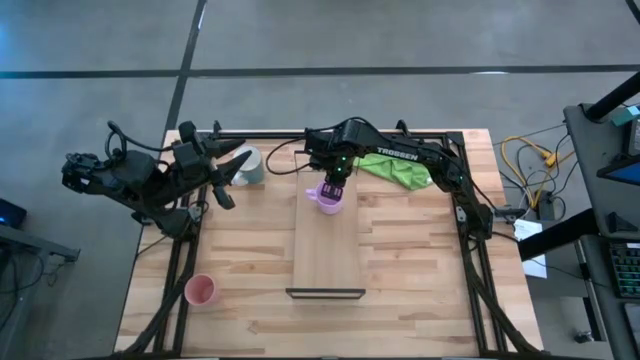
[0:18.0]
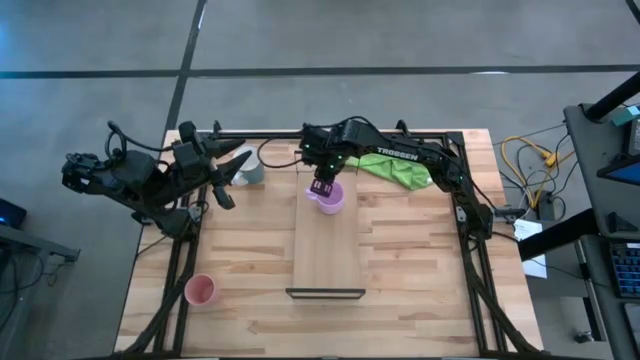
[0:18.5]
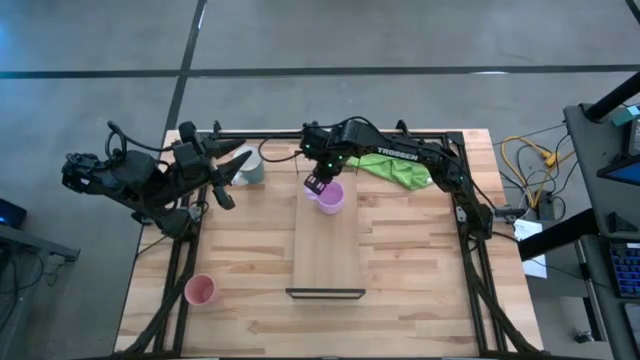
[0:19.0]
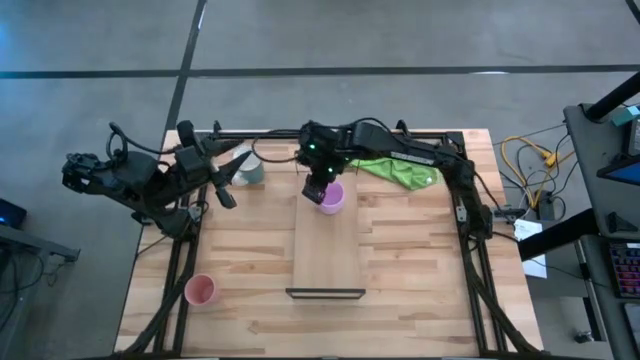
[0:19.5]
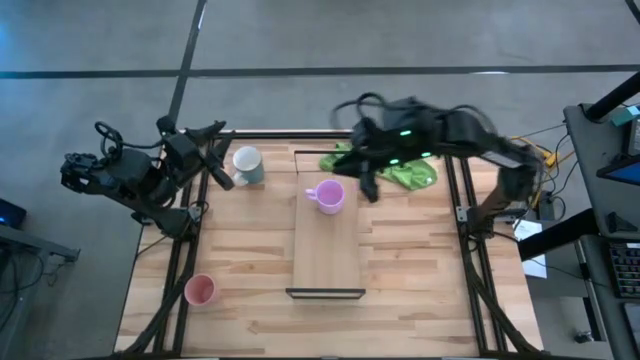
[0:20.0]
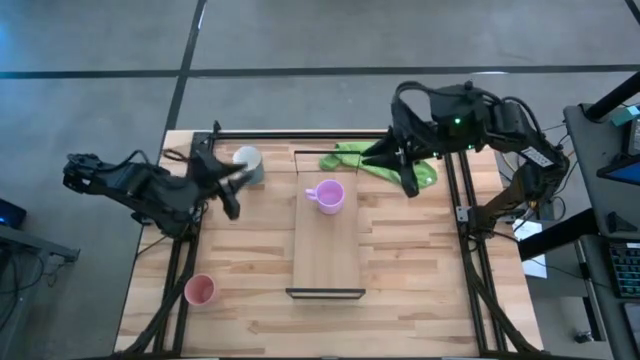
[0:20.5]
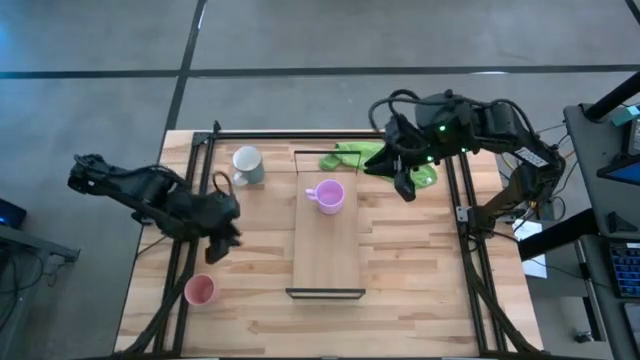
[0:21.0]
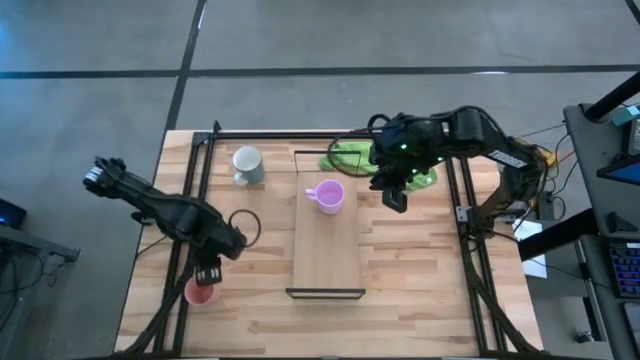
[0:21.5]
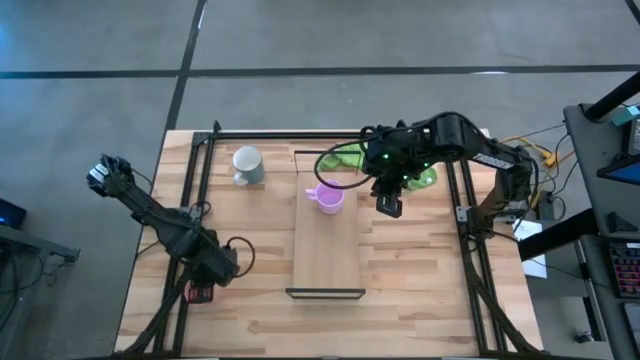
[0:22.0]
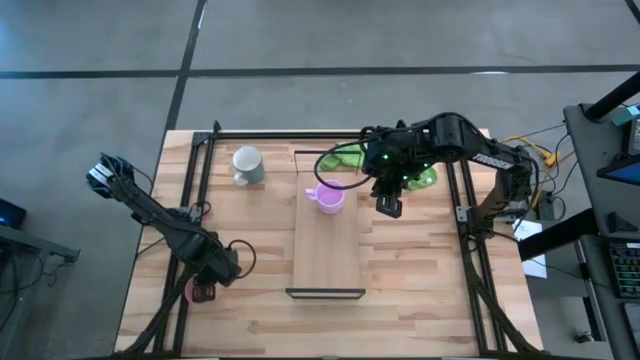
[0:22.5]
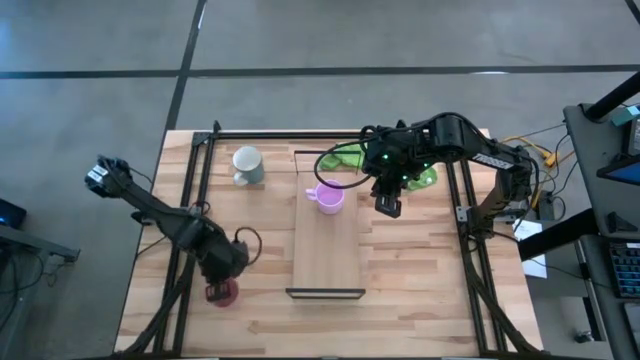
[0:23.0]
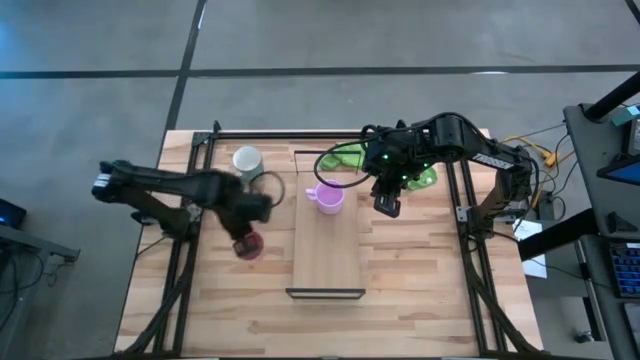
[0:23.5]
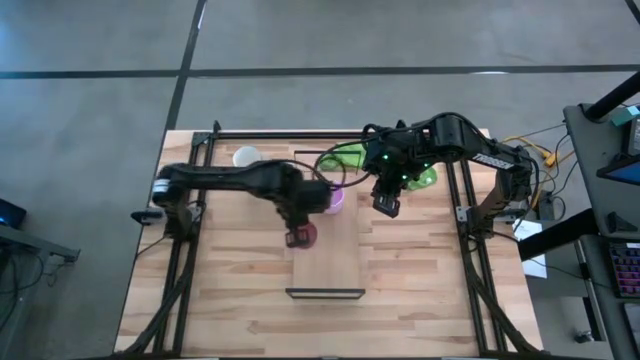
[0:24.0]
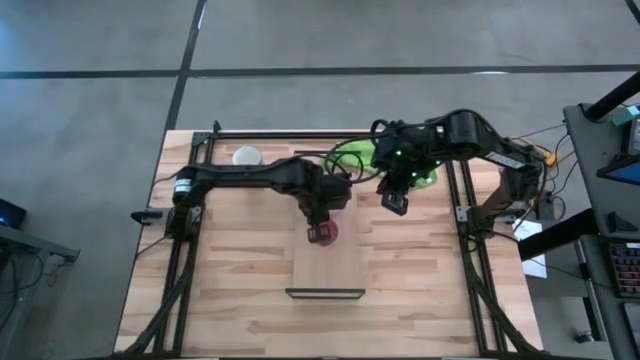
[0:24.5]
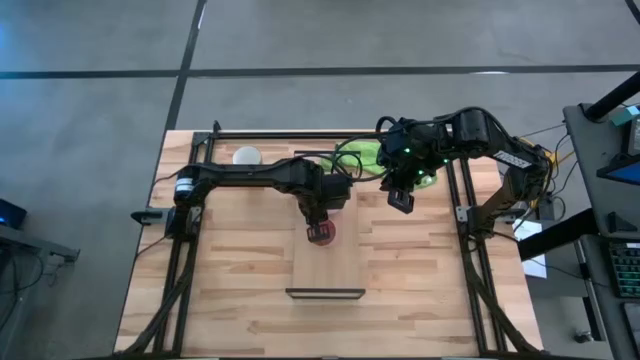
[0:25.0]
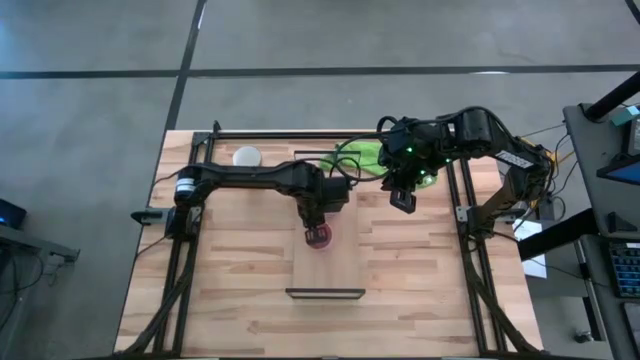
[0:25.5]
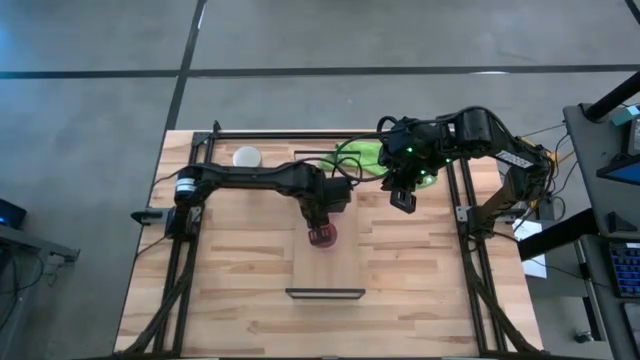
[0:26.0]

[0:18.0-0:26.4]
Task: Stack small to large cups/mugs on shelf
Put the pink cup on the shelf

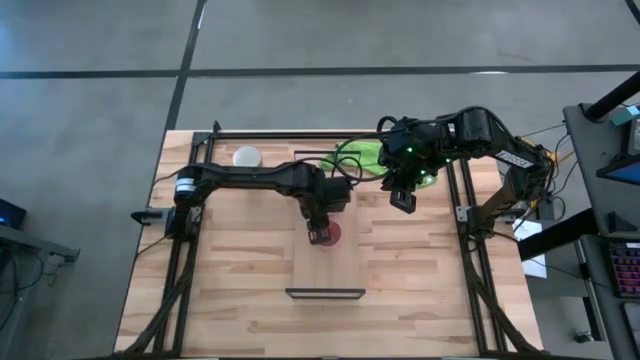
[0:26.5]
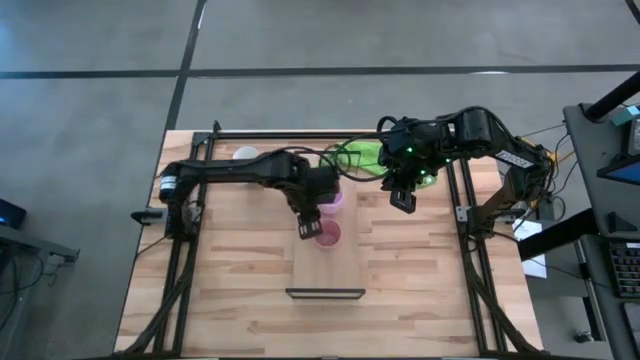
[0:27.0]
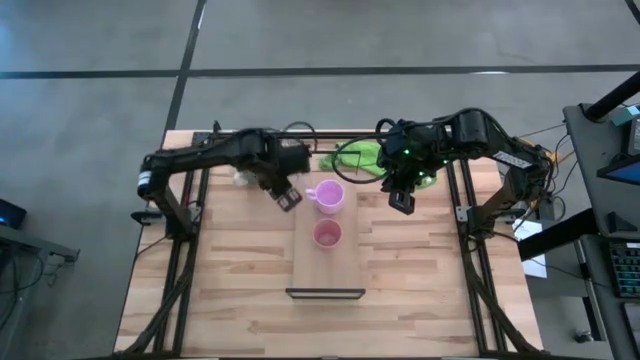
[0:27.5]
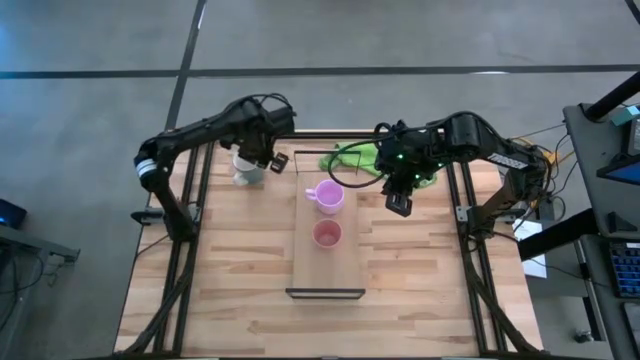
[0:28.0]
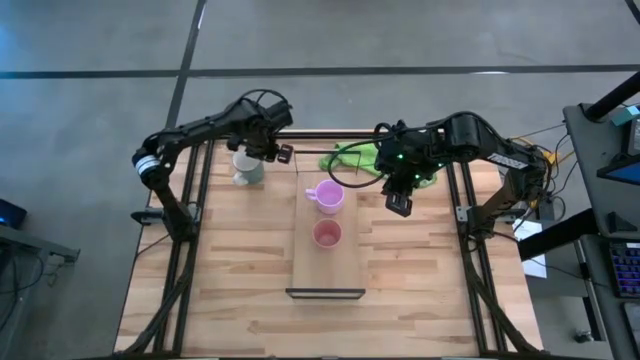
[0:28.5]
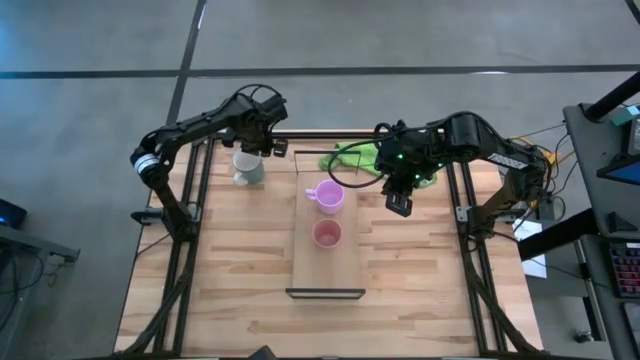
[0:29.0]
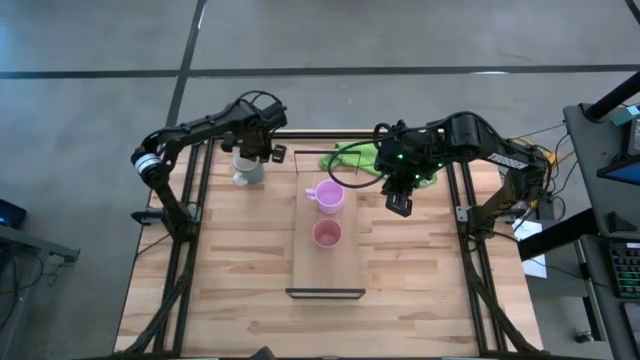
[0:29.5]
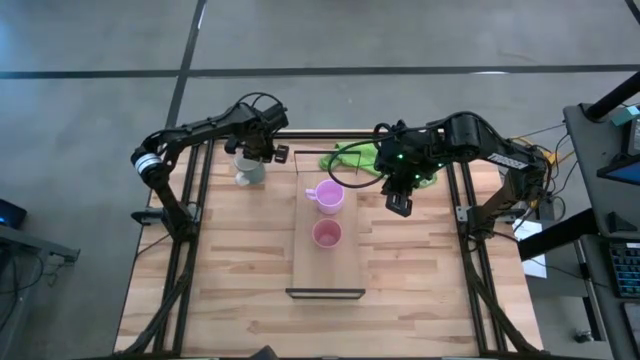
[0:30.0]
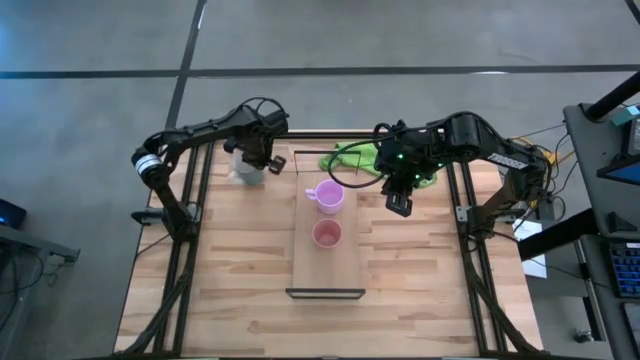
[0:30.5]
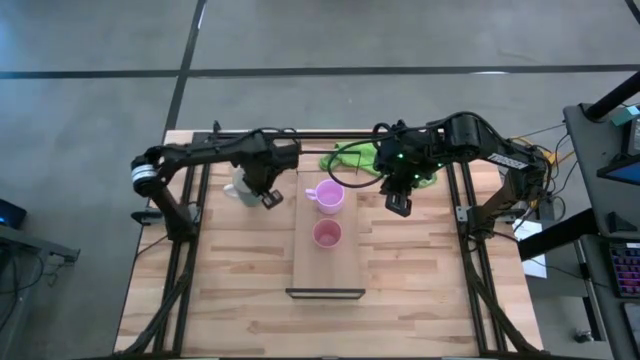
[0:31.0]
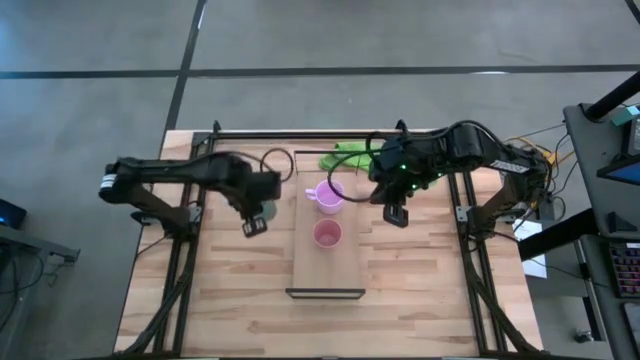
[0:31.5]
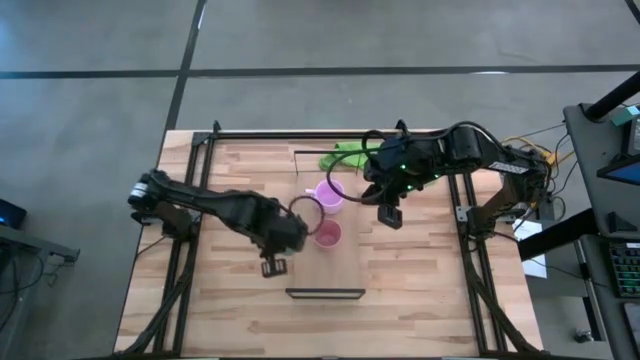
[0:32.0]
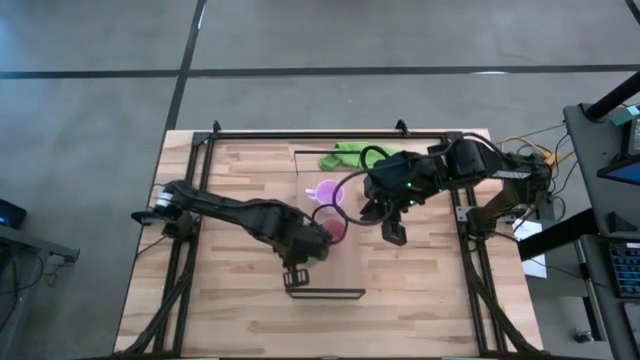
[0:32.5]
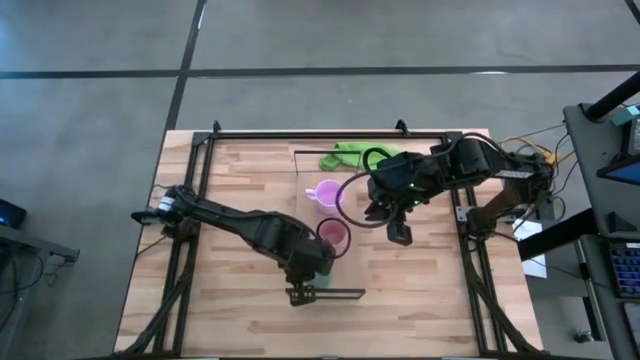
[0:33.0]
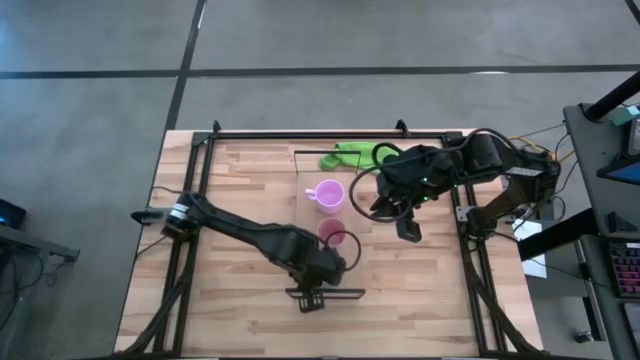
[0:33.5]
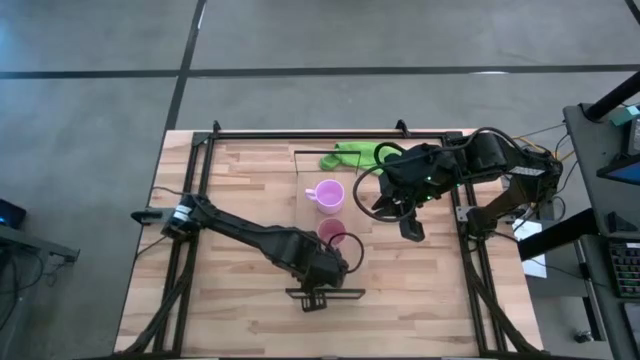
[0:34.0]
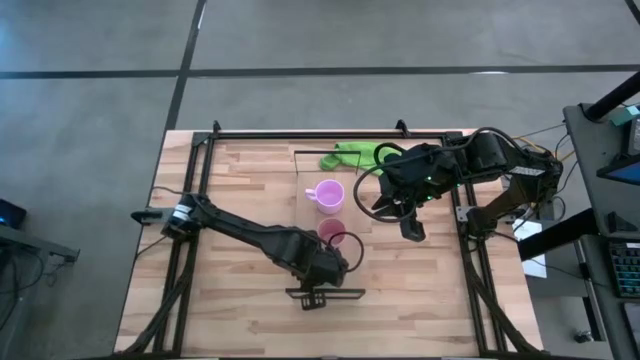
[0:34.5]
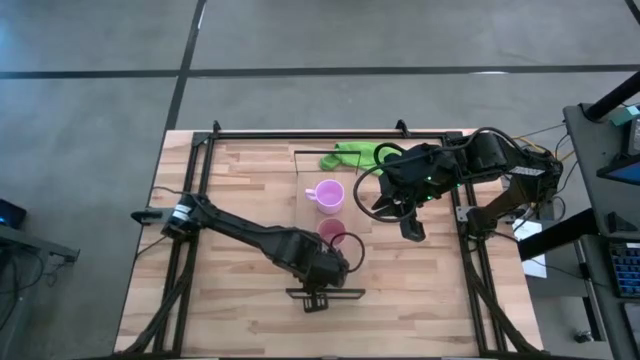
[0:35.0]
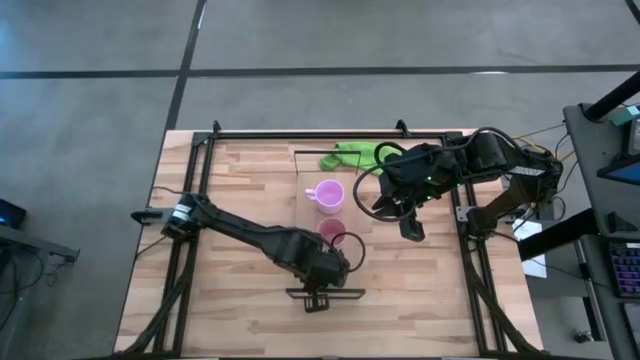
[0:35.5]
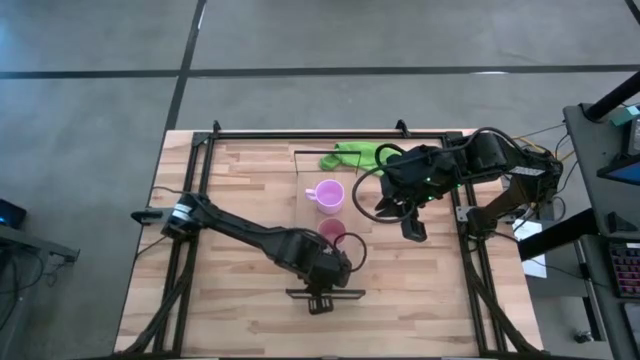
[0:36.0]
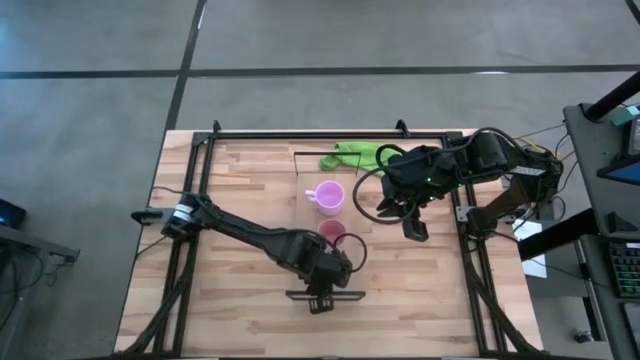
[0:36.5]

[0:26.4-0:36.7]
Put the green mug on the shelf
